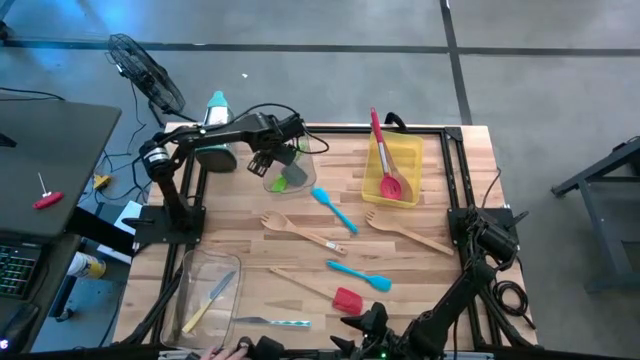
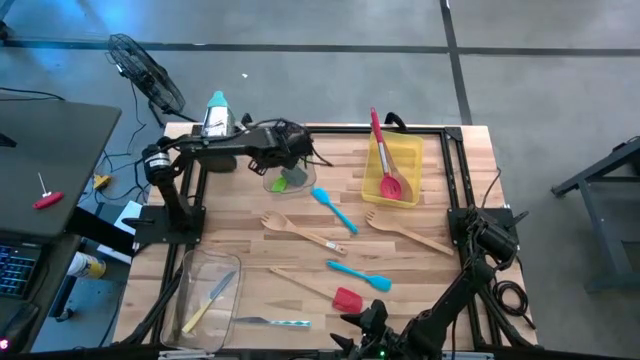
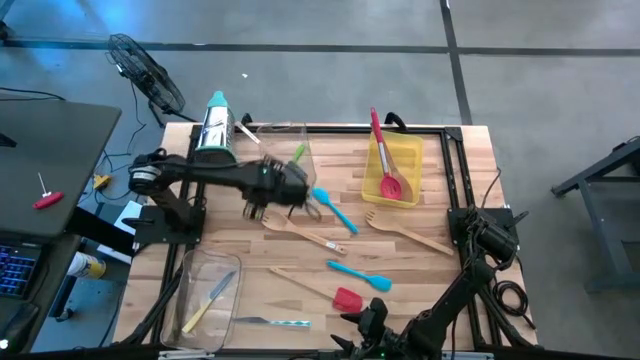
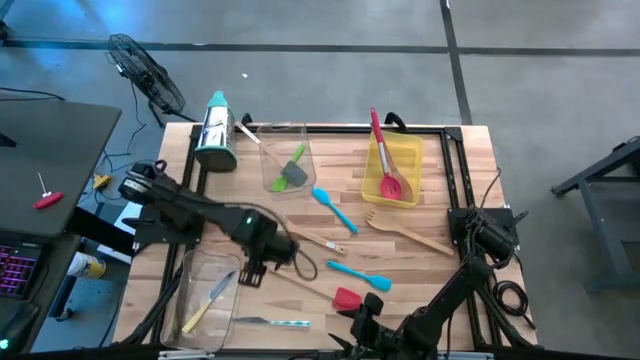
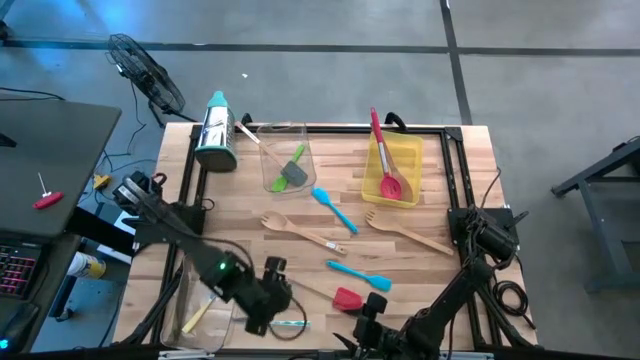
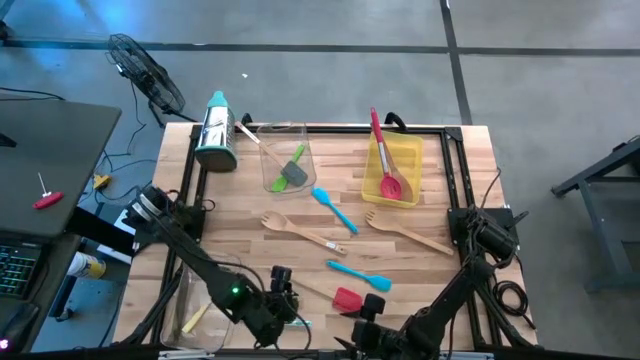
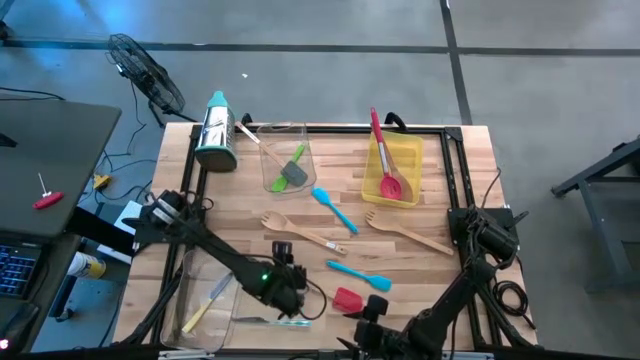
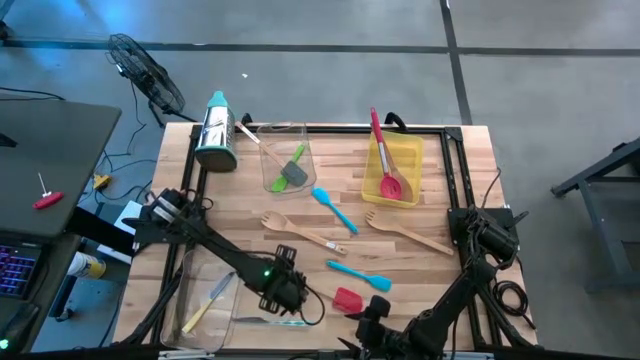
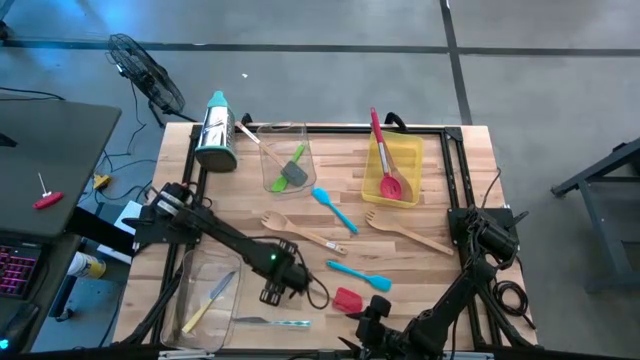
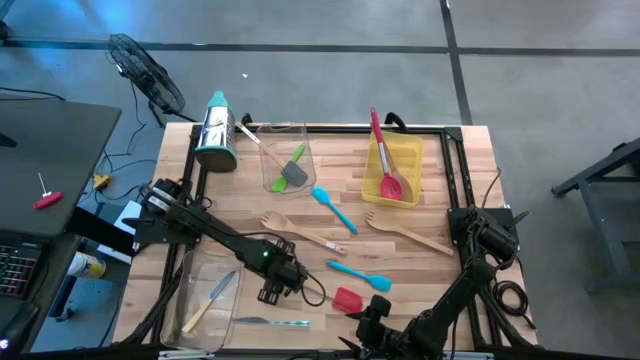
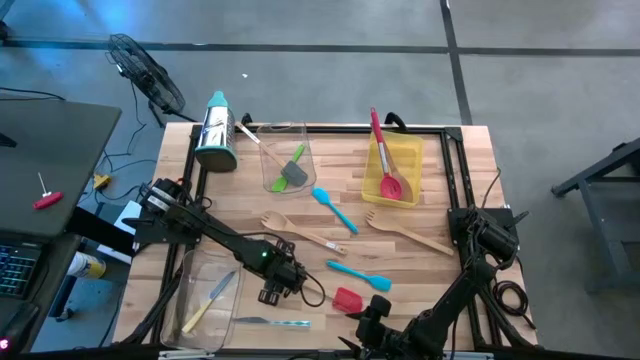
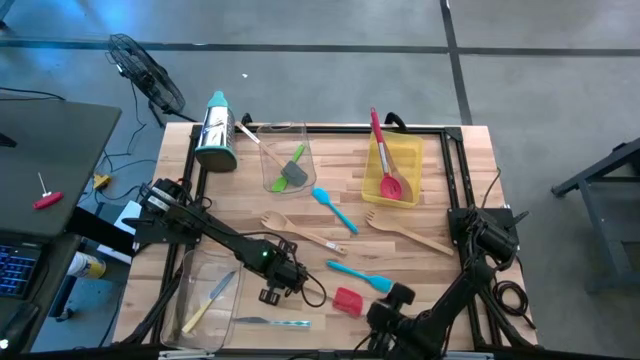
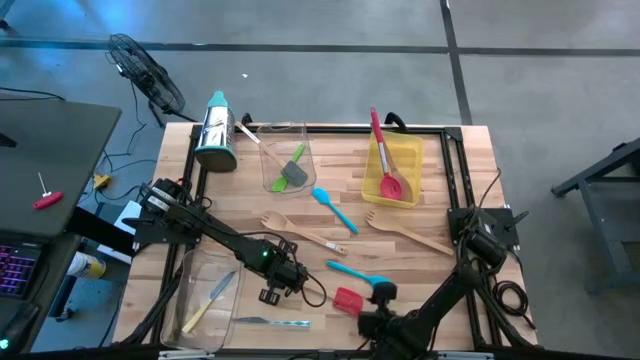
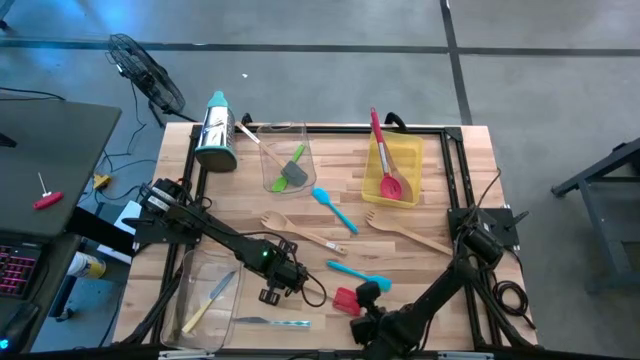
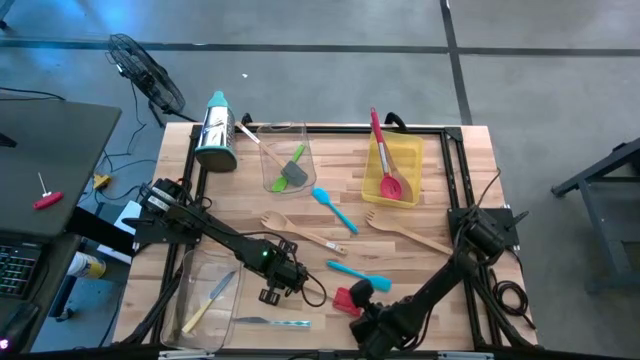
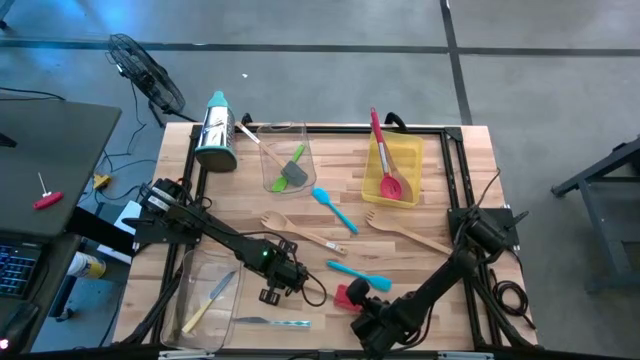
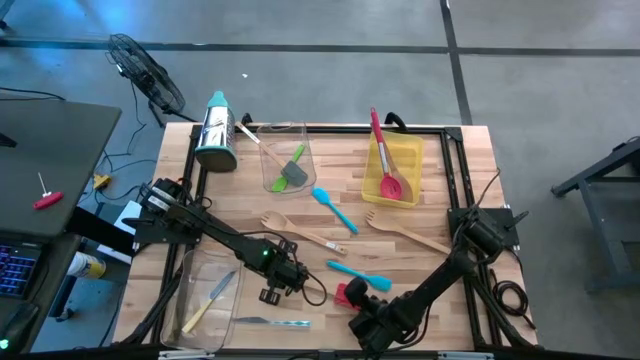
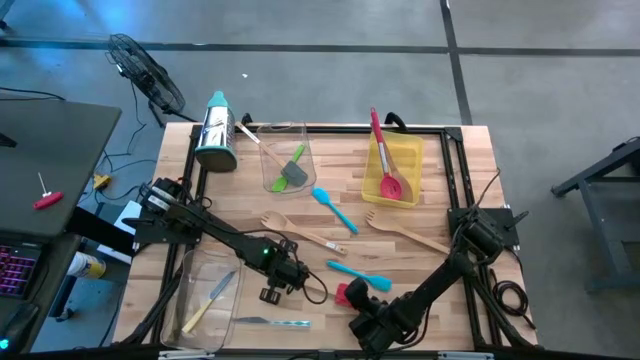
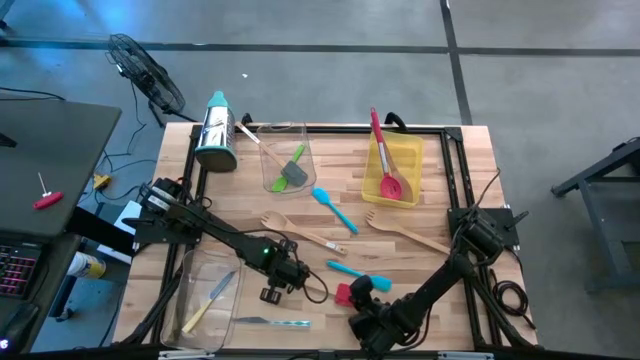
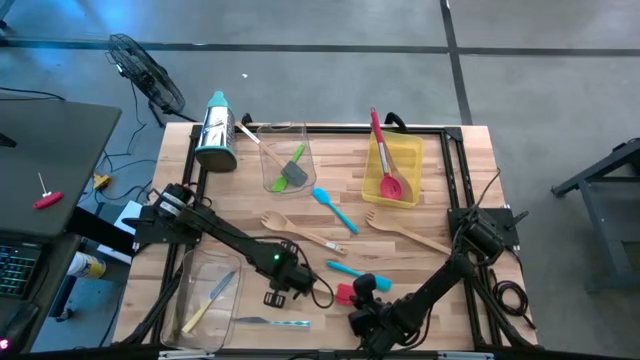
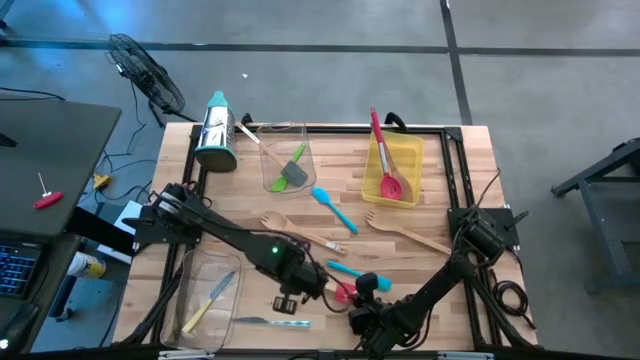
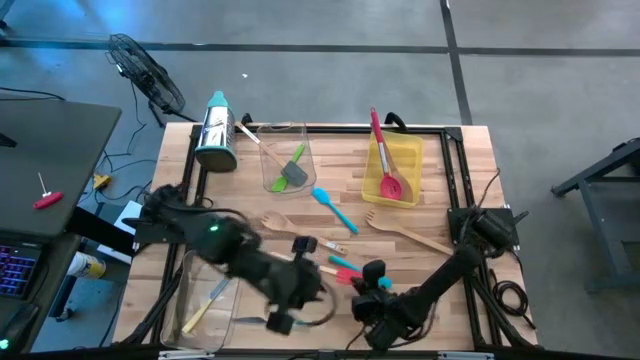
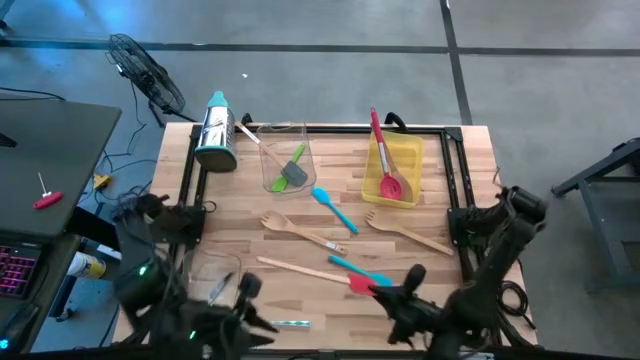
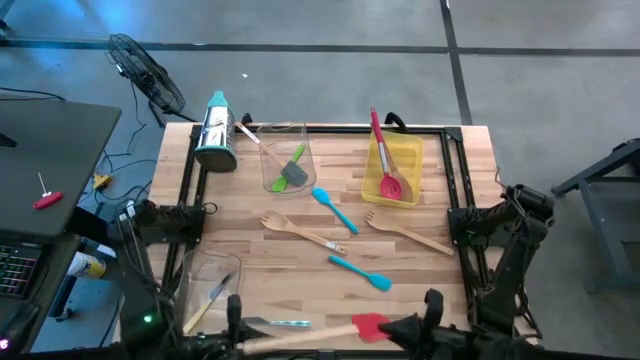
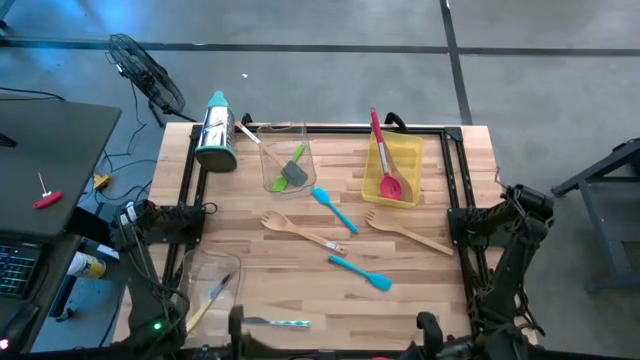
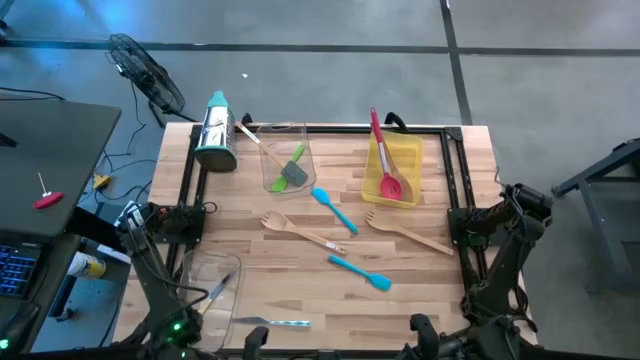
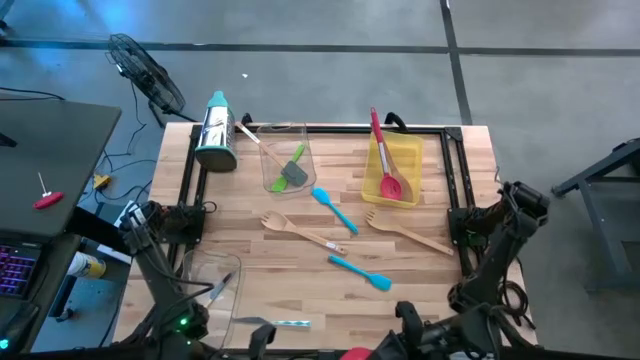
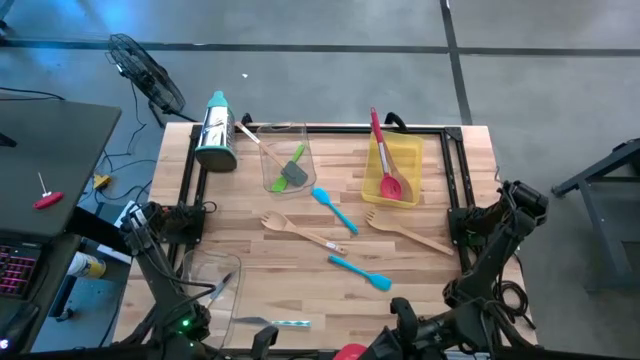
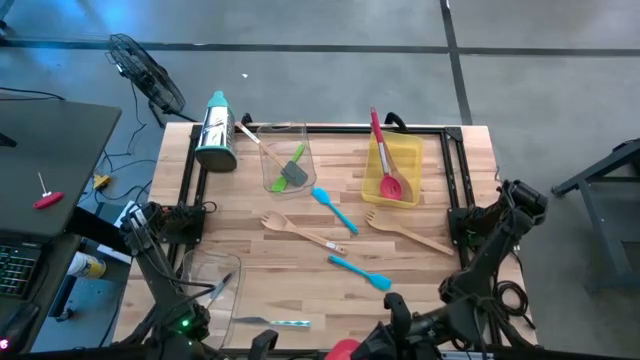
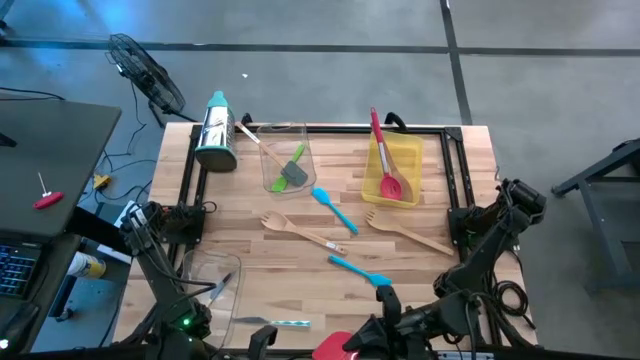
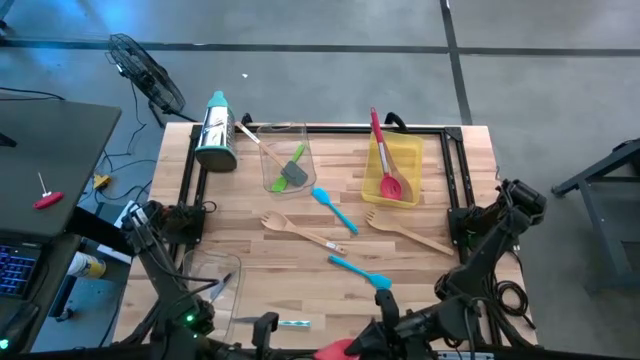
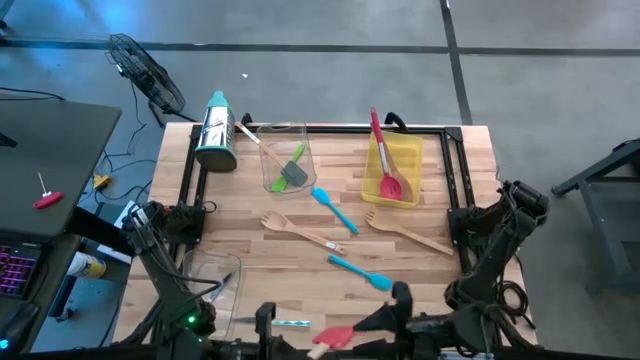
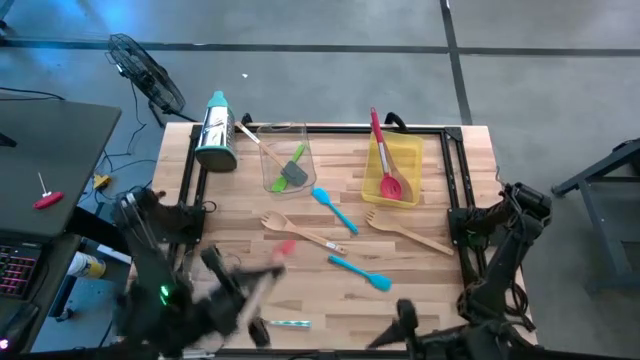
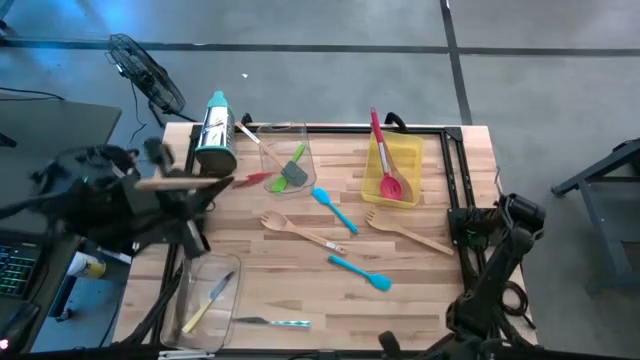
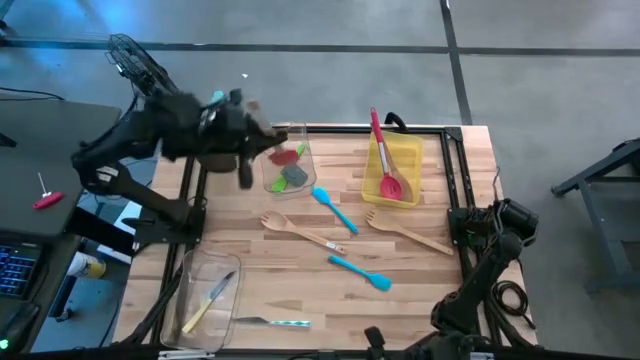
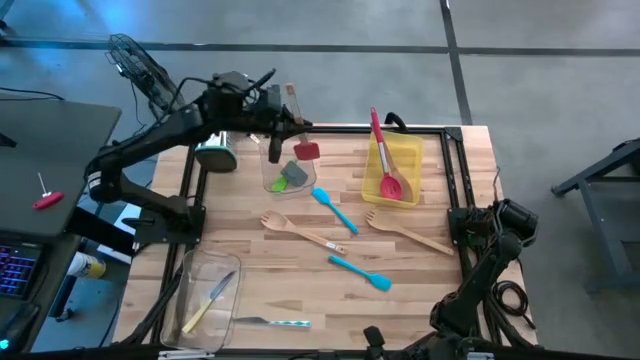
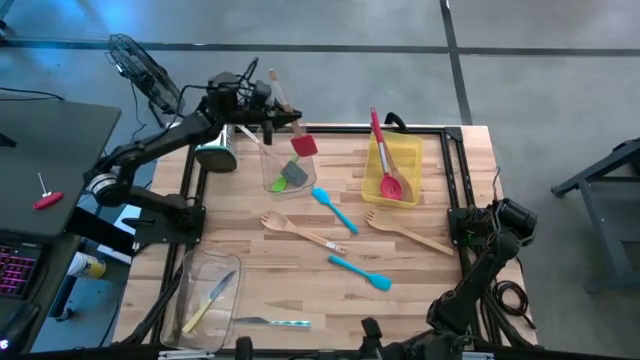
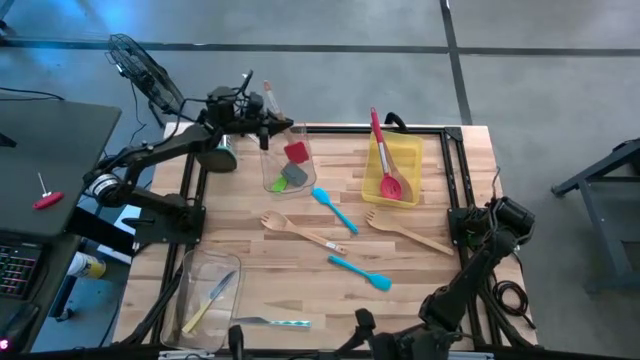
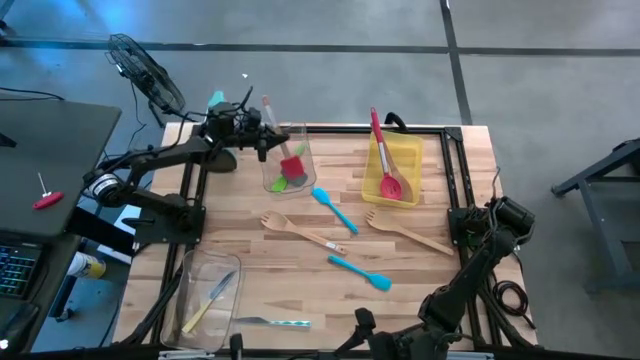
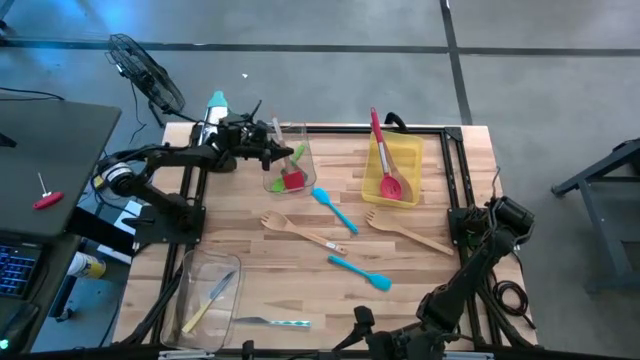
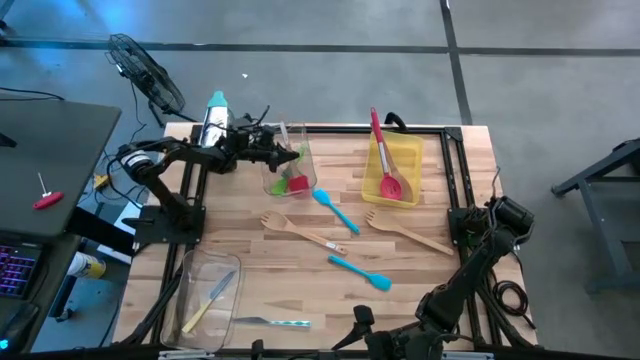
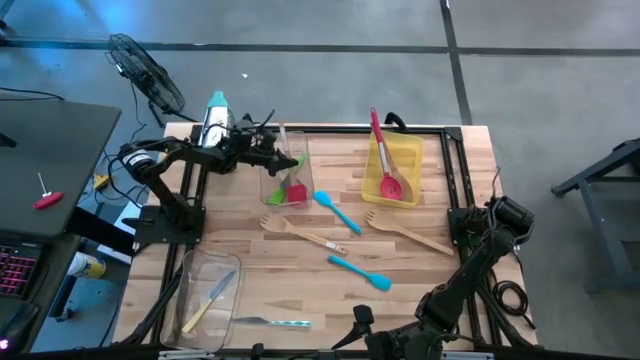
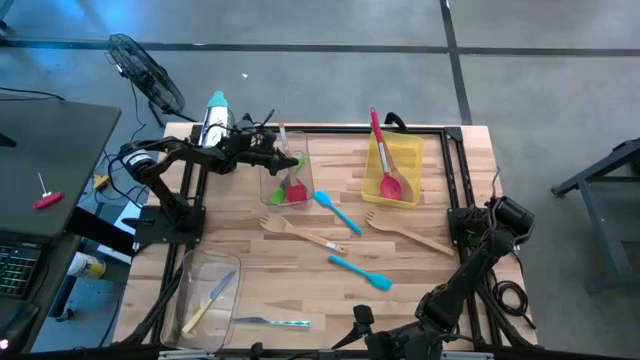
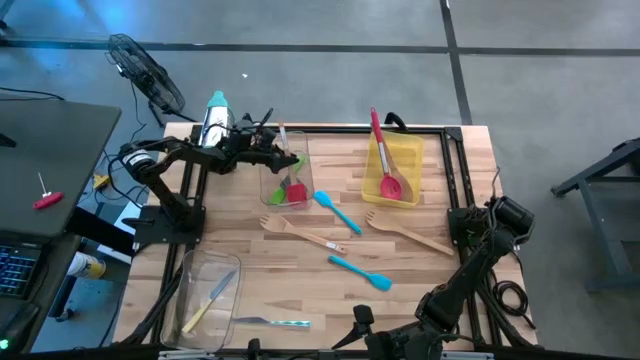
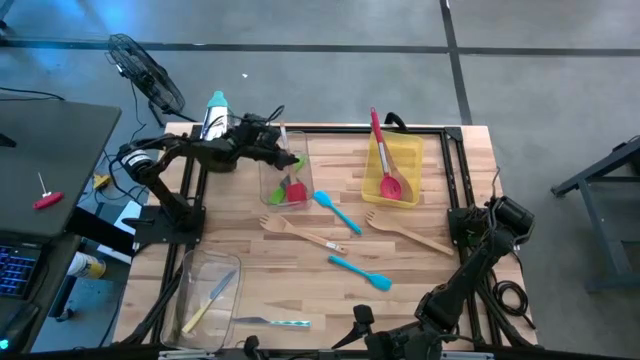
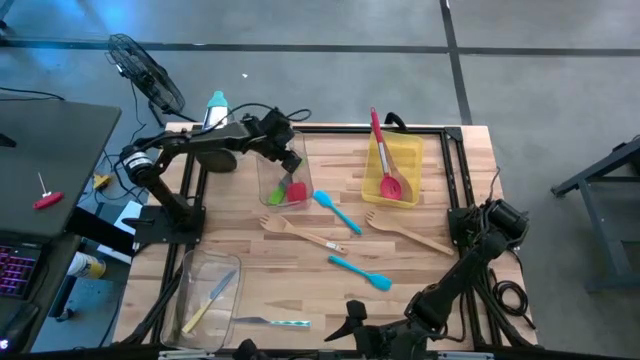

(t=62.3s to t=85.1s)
Task: Pick & Place Kitchen Items
Put the orange spatula into the top transparent bin
